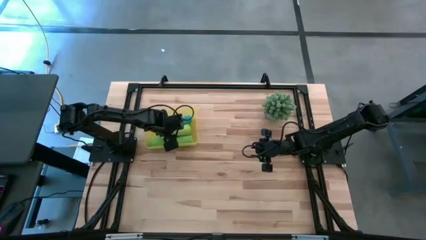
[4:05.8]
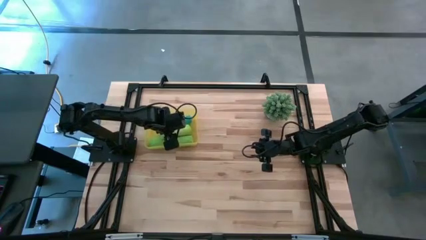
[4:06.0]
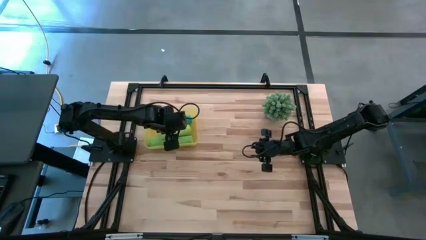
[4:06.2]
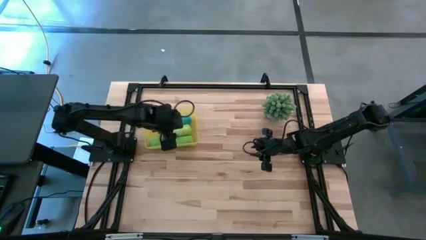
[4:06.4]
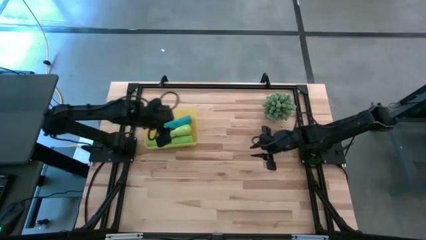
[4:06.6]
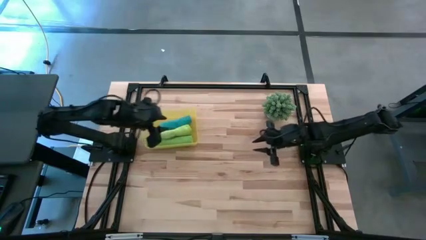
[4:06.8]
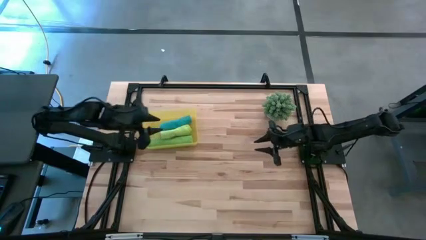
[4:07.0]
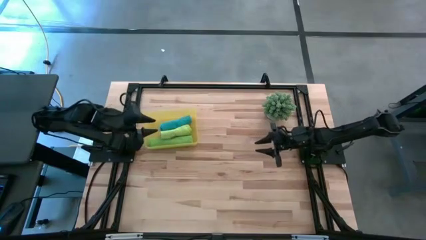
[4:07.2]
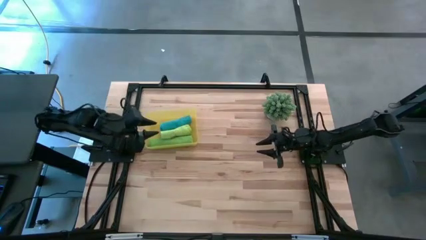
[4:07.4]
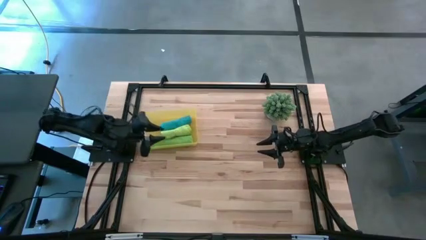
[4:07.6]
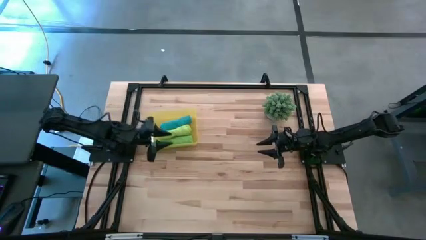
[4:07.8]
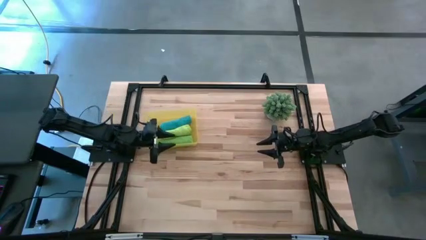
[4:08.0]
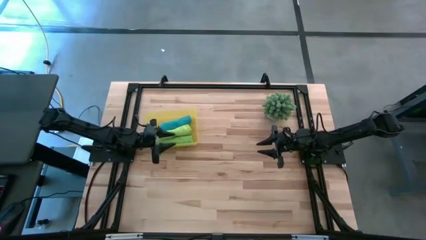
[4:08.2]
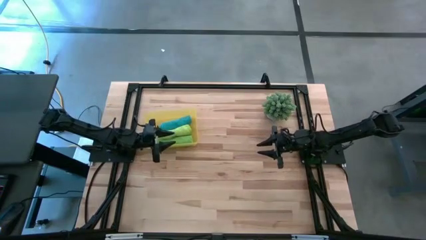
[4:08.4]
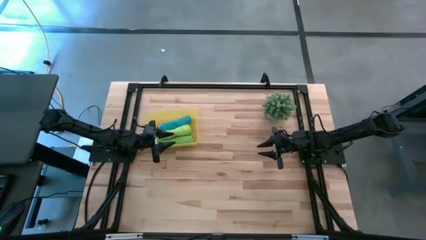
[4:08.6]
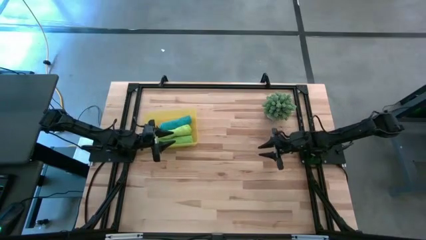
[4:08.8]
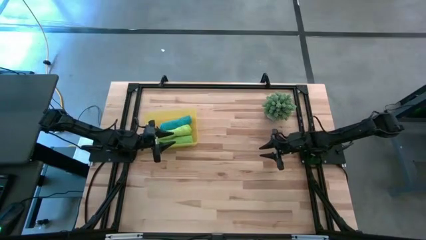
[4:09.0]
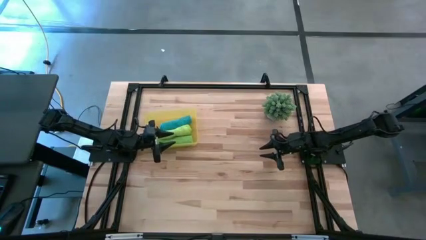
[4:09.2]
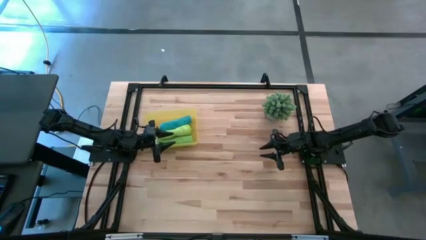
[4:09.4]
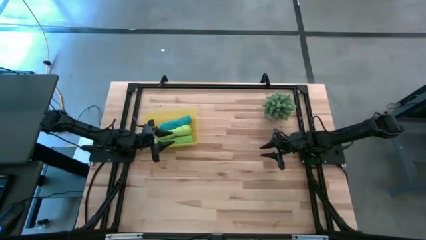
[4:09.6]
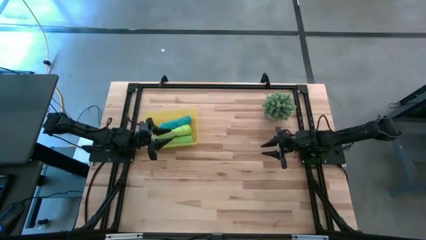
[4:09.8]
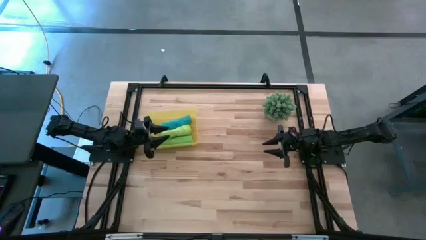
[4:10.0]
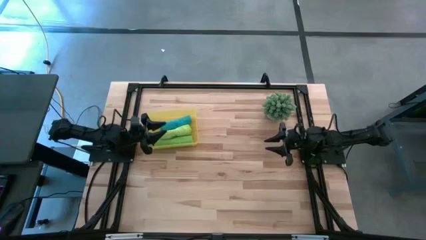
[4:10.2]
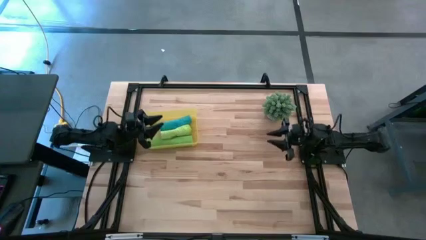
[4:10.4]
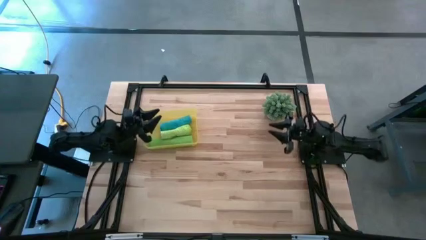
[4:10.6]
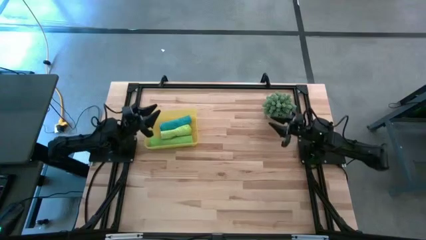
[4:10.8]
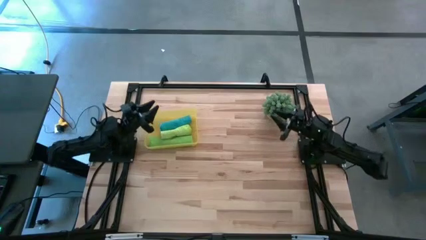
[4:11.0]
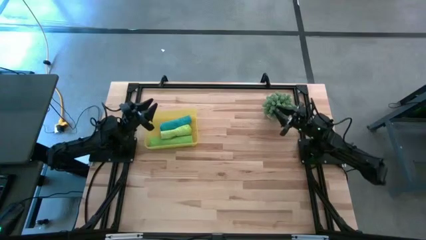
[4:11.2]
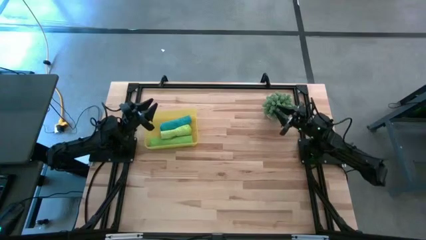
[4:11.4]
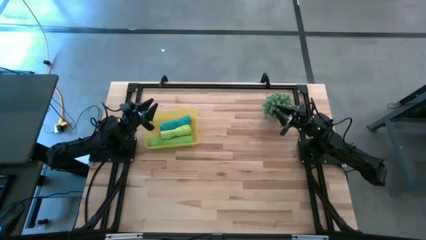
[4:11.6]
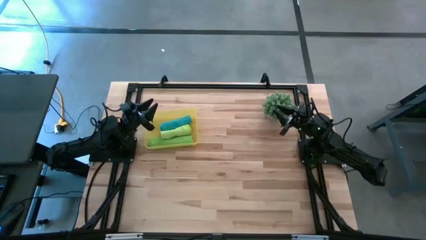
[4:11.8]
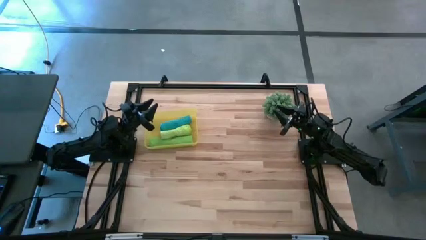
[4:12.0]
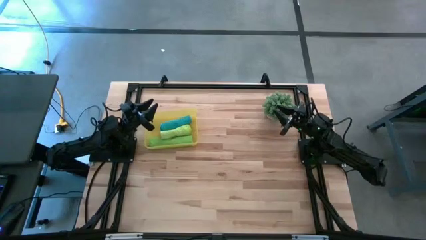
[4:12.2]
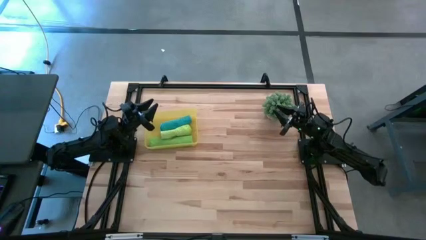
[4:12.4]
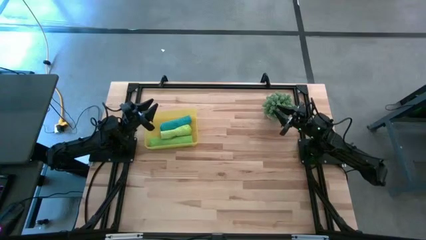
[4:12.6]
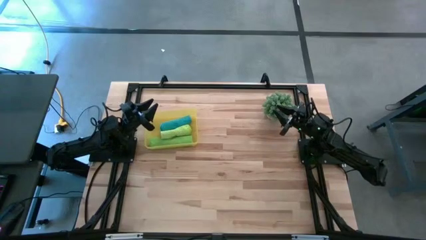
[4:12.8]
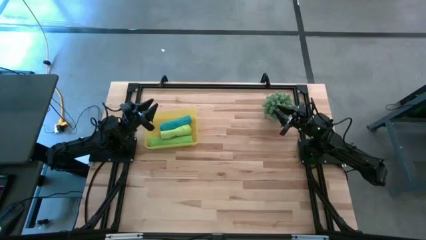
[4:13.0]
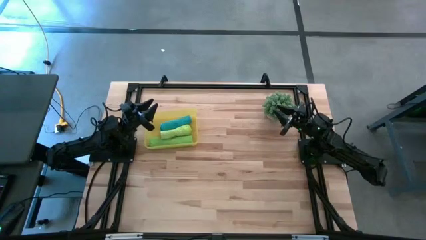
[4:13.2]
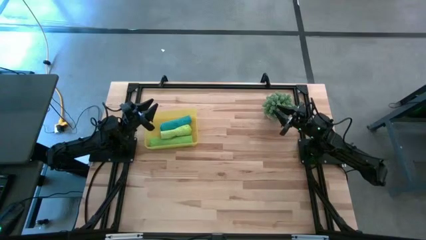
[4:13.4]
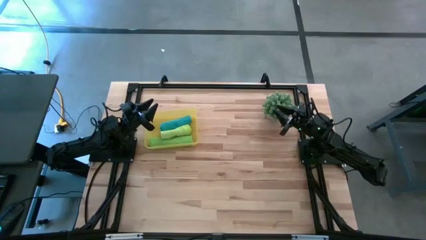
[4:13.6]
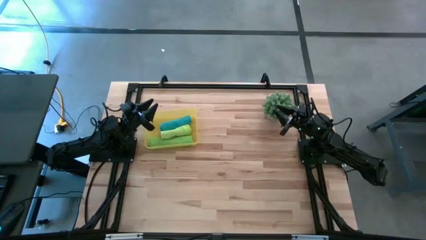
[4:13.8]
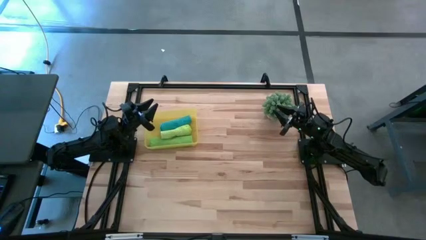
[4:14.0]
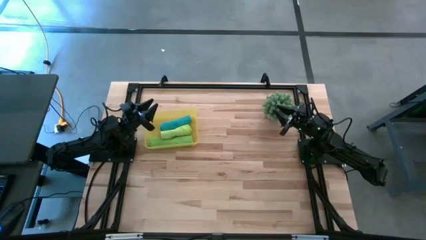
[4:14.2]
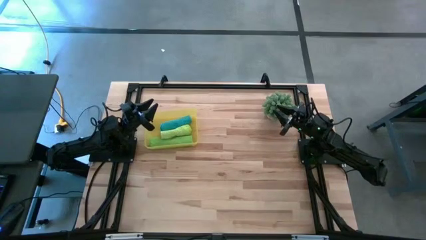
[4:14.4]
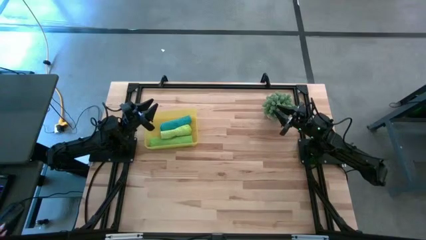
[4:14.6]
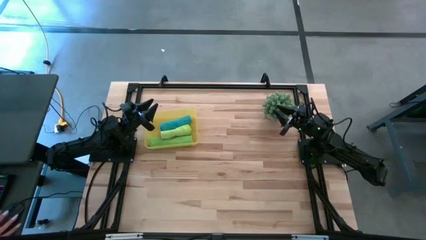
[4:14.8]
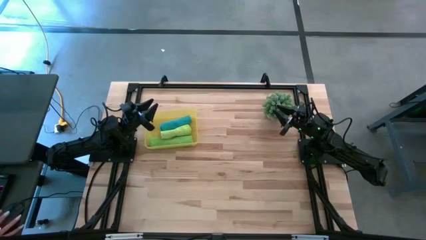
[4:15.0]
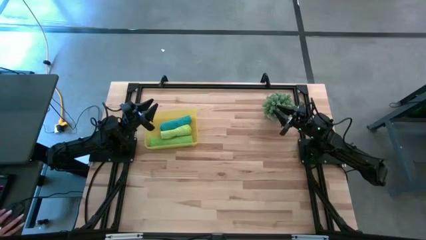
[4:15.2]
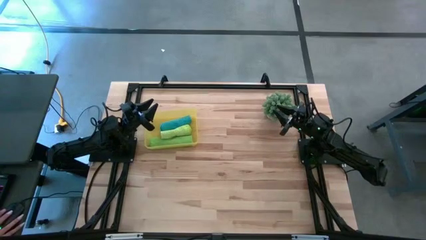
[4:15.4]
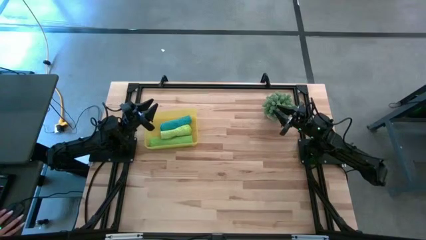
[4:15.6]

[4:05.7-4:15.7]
Task: Roll microfiber towels into tight, uniform cylinder then place into a basket
Return to Home Position

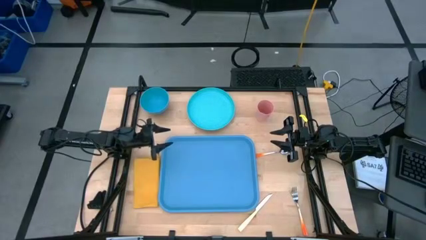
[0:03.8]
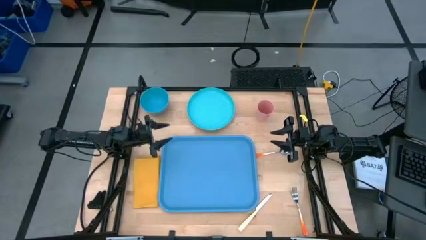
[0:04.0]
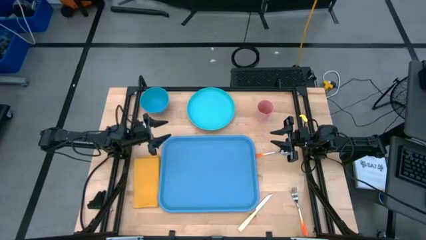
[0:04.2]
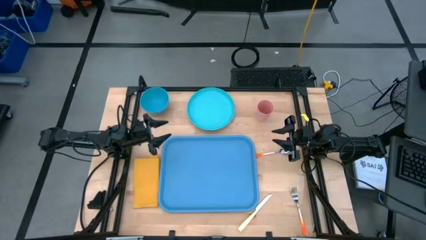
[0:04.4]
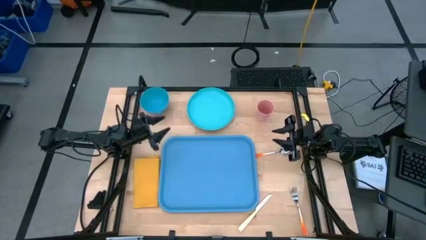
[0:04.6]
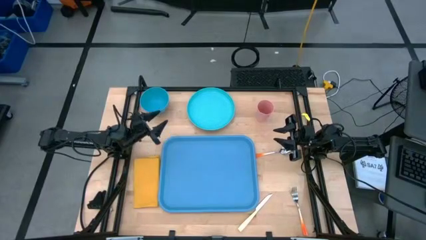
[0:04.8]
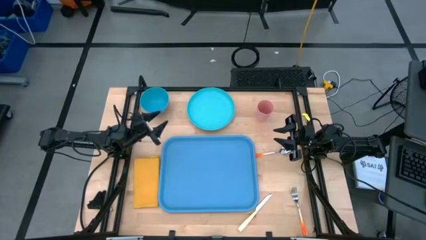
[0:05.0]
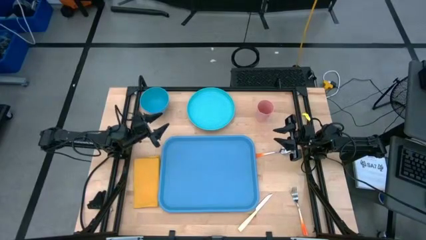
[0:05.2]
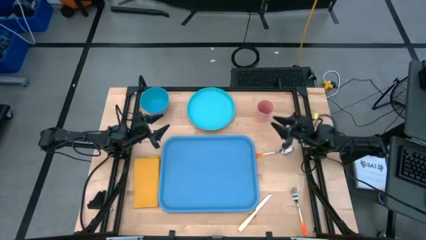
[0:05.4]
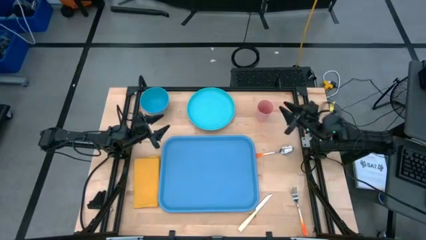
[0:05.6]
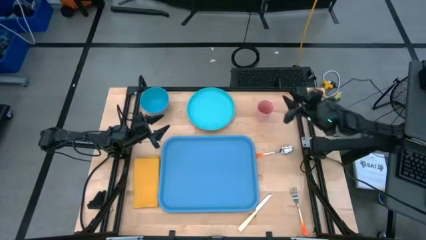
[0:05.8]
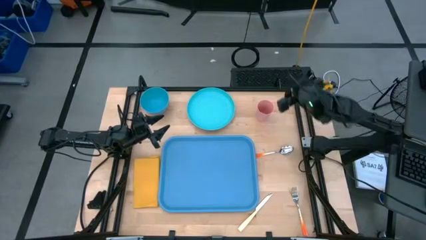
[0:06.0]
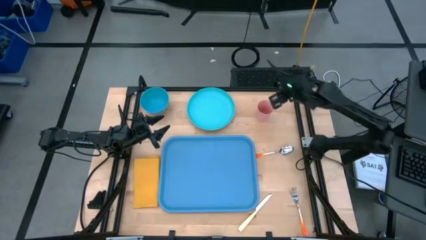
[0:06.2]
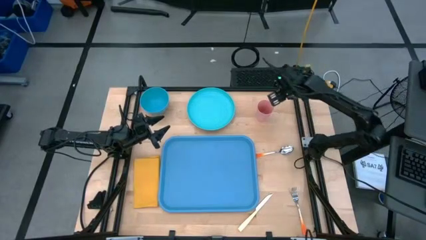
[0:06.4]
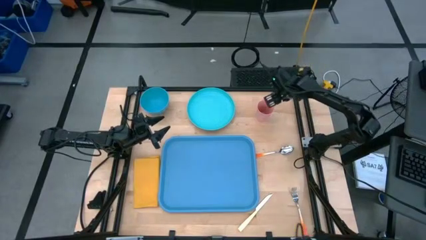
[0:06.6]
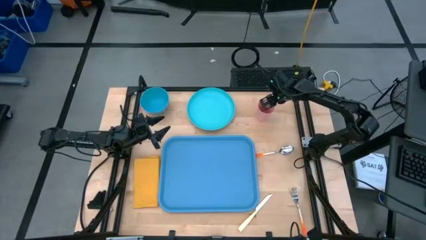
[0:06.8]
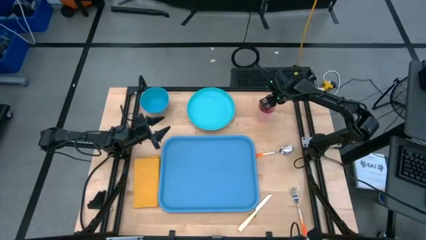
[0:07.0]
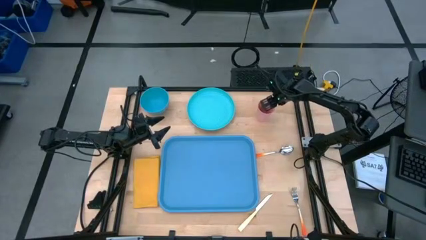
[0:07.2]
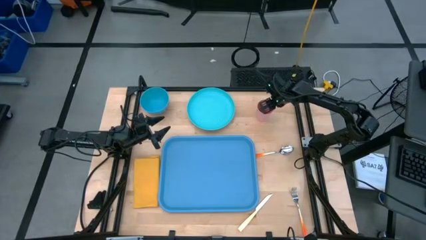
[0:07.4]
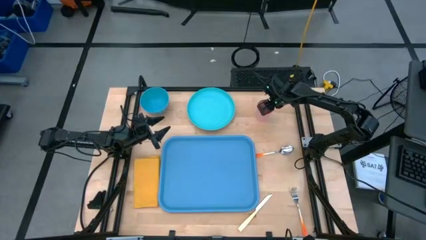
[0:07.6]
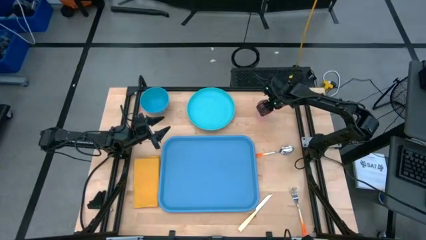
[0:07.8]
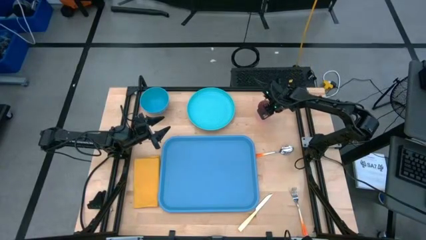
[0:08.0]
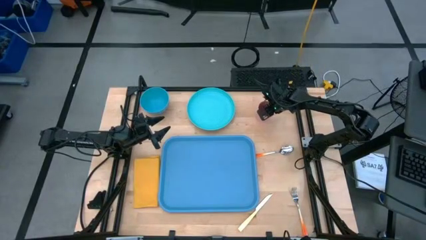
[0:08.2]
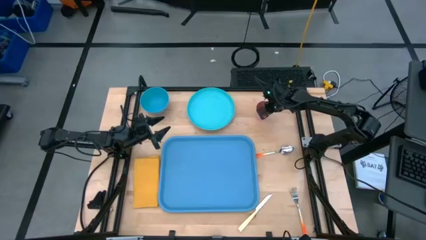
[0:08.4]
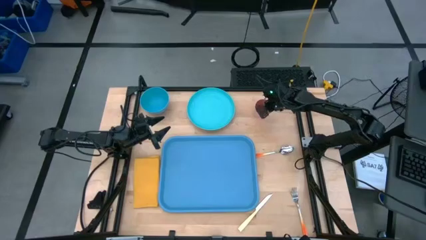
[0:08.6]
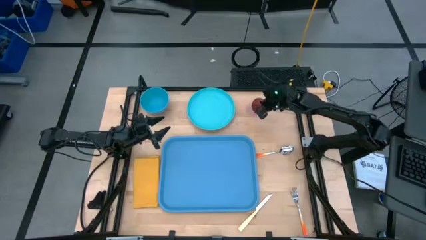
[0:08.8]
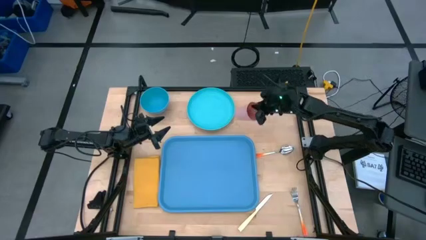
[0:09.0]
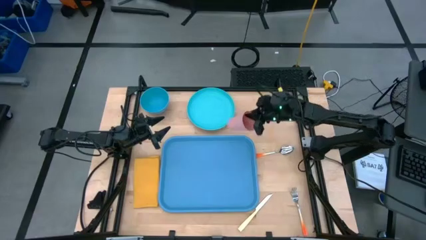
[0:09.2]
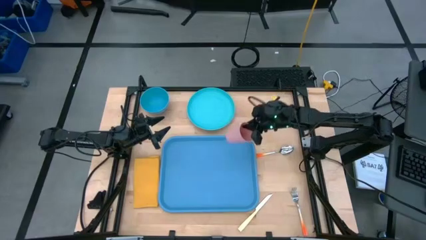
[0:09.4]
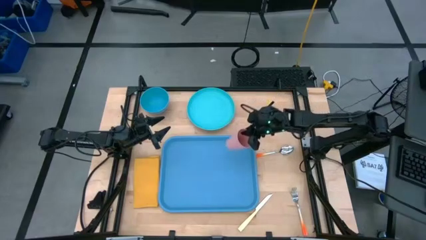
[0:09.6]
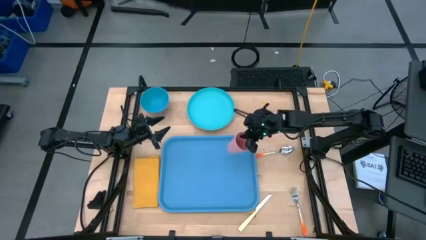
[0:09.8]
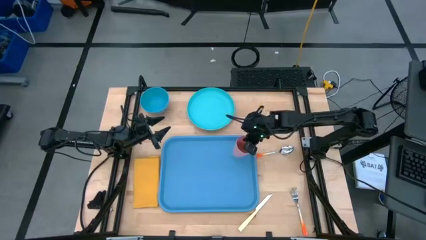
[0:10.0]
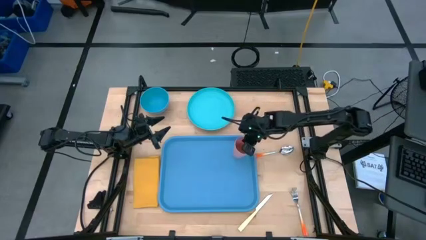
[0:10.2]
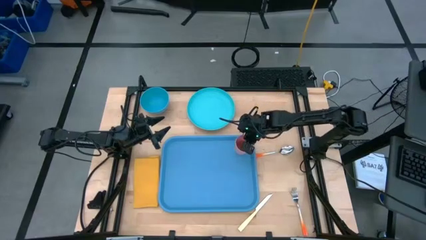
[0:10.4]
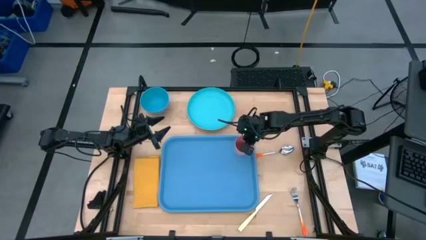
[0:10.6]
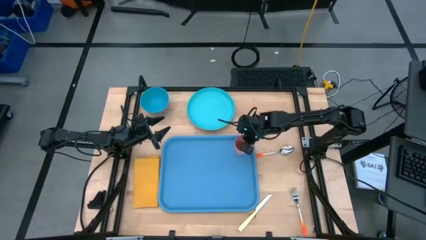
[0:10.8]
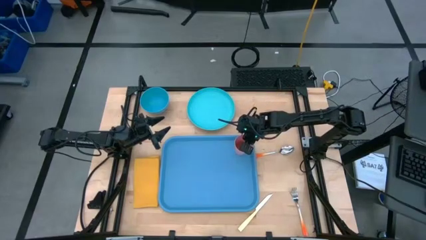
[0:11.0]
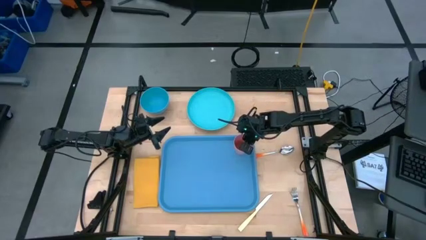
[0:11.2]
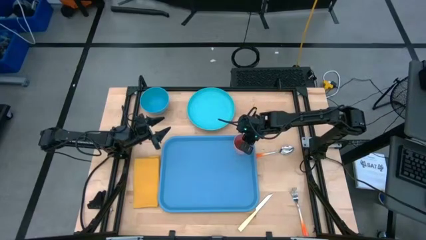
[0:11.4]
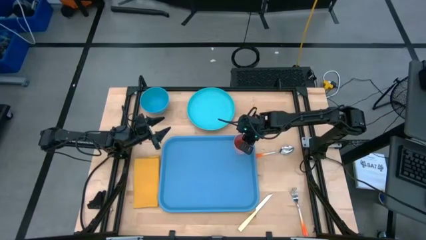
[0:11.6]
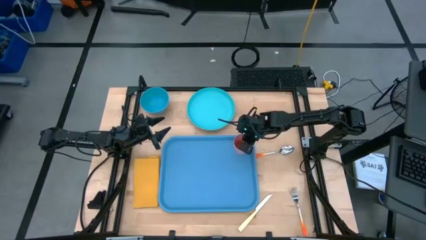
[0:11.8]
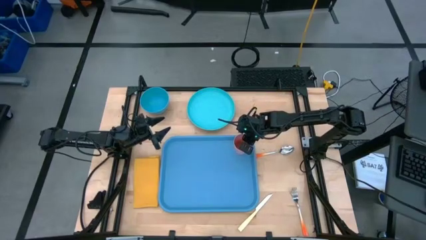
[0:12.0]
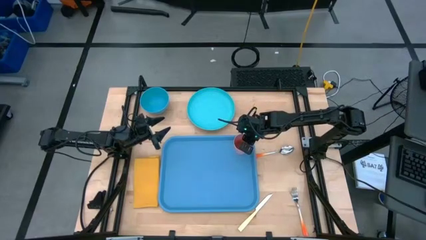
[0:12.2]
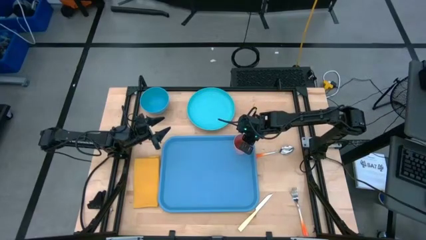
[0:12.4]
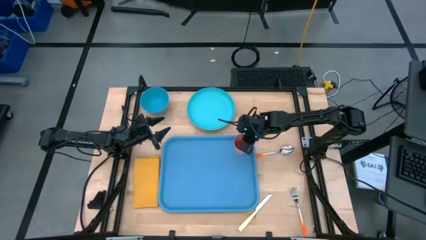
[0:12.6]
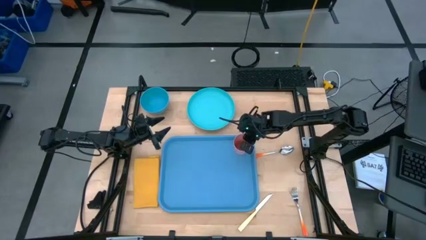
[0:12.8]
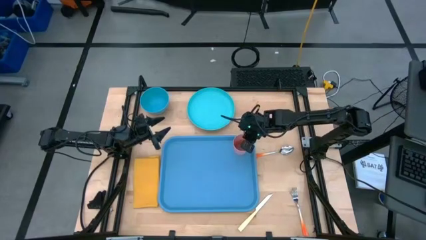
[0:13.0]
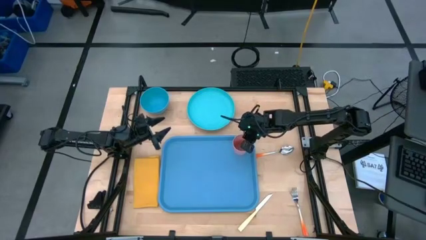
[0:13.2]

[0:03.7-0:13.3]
Task: Set up tray
Put the pink cup on the blue serving tray
